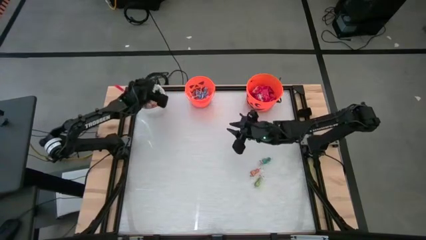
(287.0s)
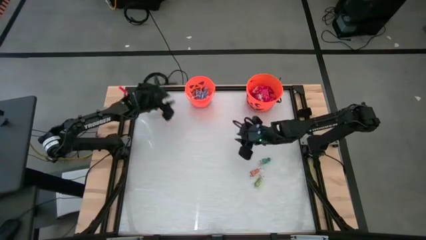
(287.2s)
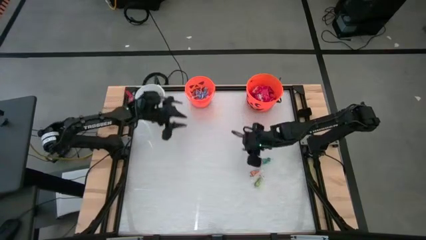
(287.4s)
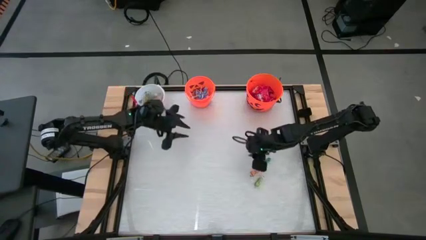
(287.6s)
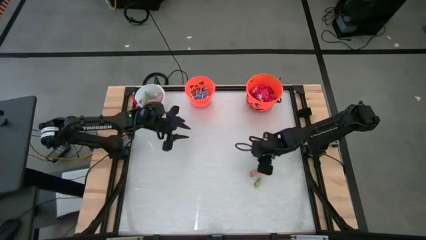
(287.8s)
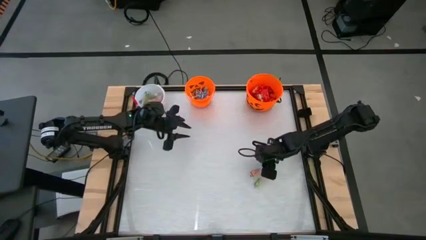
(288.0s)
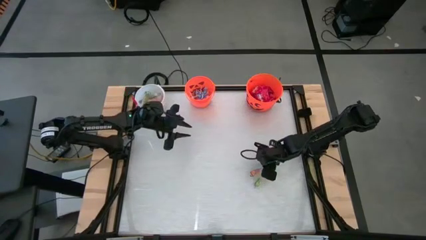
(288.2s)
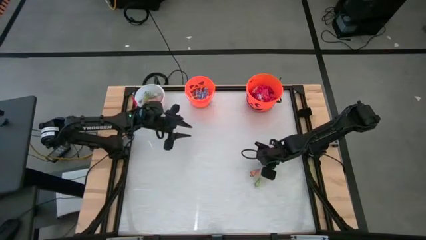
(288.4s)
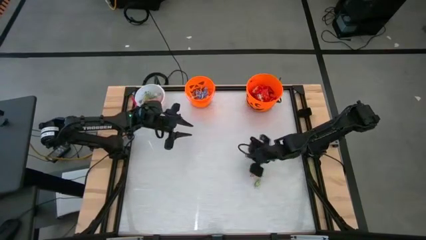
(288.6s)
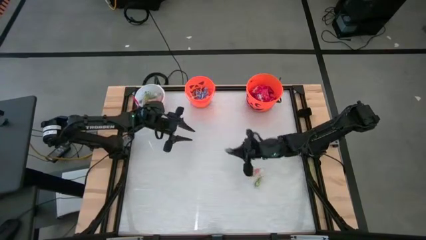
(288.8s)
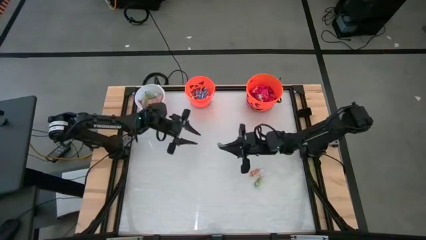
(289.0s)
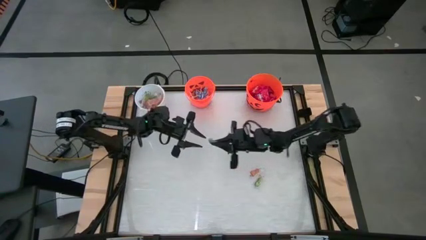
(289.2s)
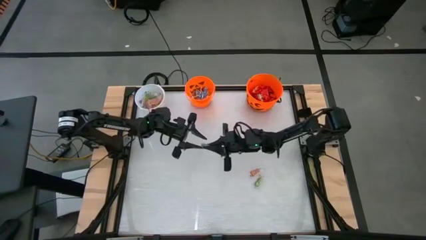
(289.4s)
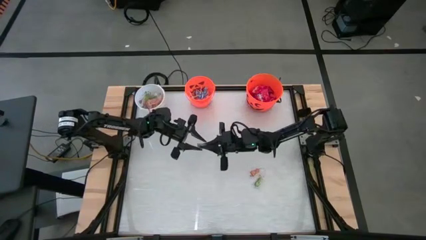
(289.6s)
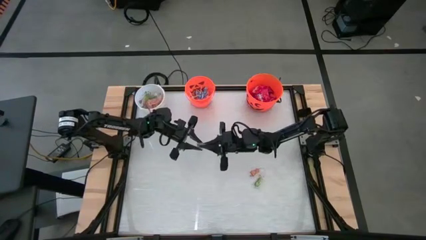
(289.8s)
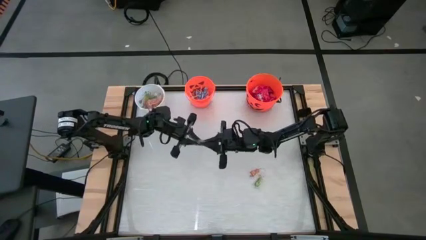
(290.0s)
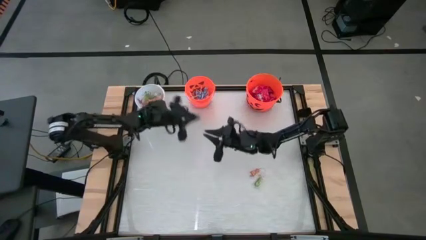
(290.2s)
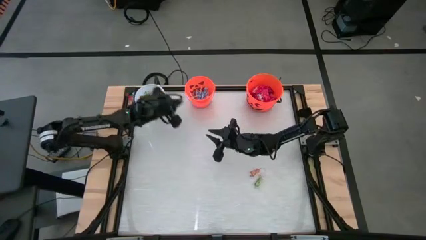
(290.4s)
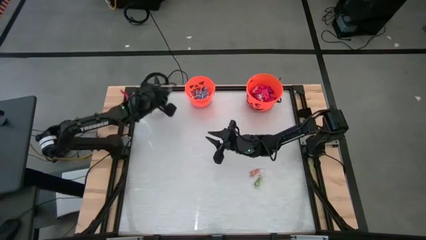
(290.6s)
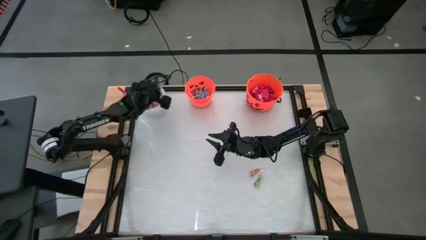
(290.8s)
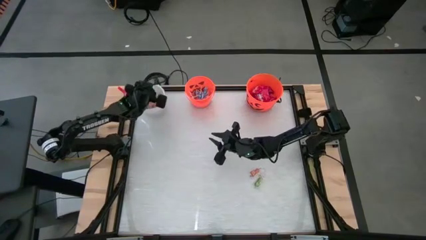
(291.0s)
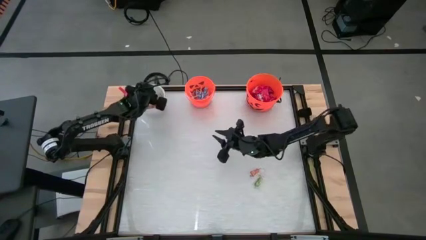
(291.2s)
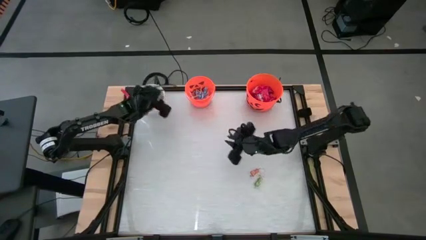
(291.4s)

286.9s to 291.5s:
Task: Sort candy by brand, put in halloween buckets
Put the blue gummy into the white bucket

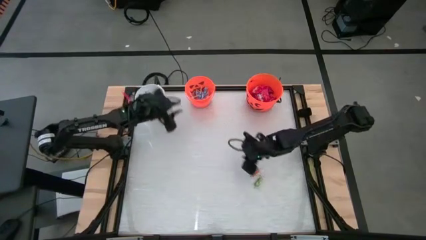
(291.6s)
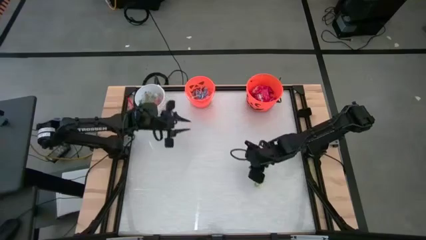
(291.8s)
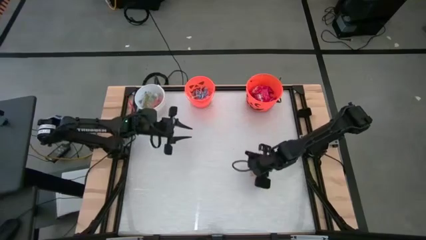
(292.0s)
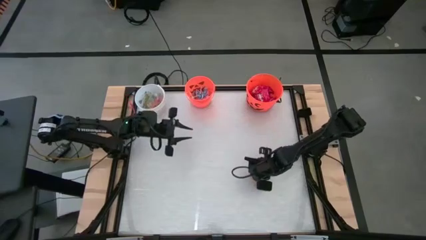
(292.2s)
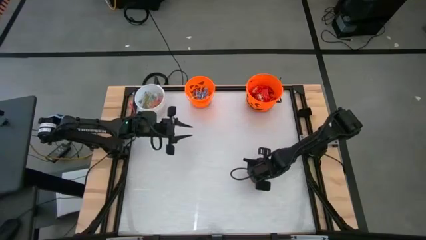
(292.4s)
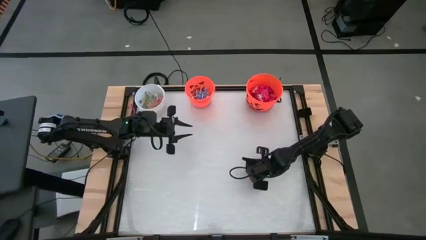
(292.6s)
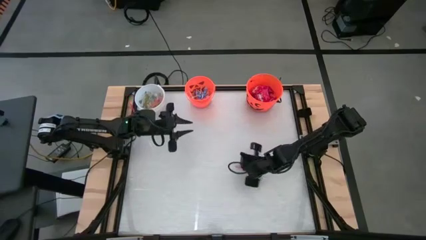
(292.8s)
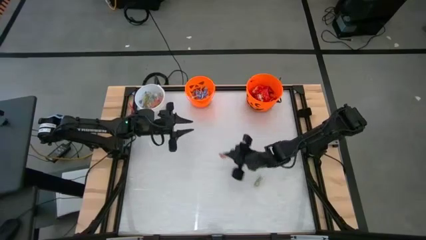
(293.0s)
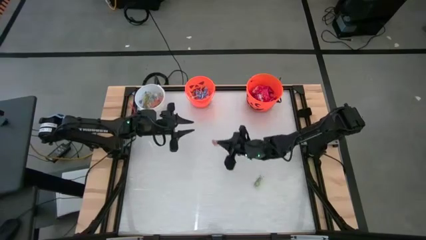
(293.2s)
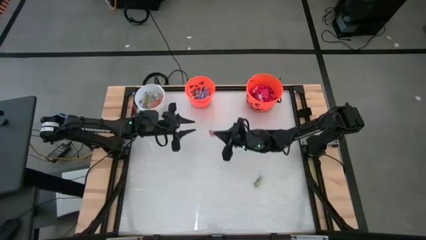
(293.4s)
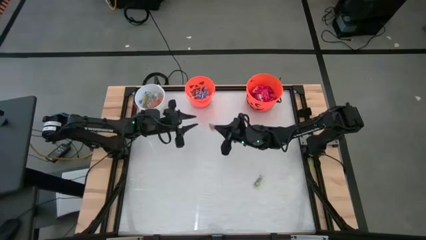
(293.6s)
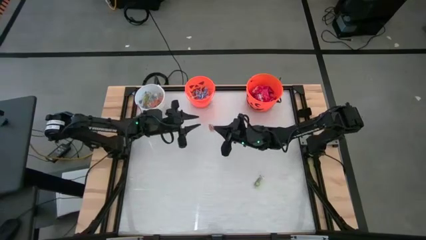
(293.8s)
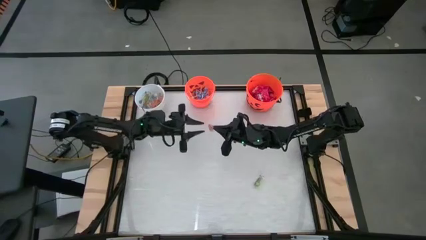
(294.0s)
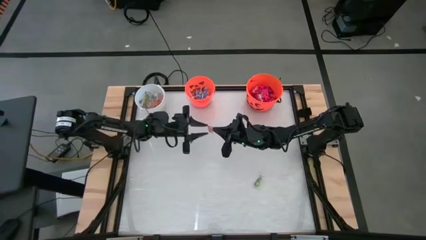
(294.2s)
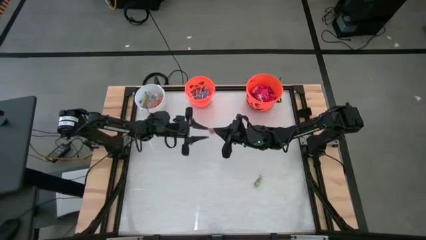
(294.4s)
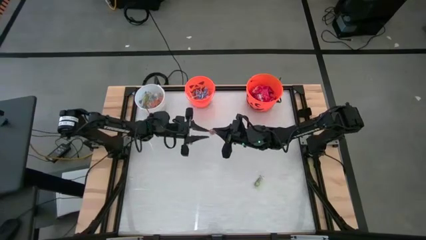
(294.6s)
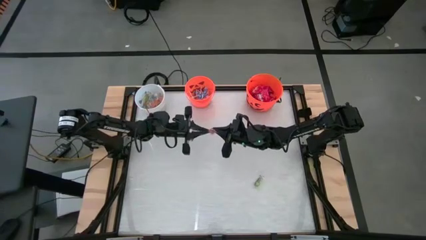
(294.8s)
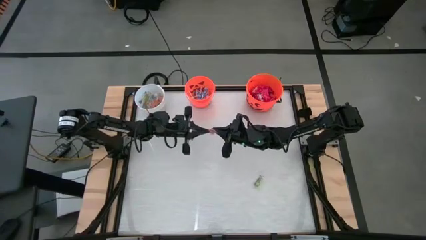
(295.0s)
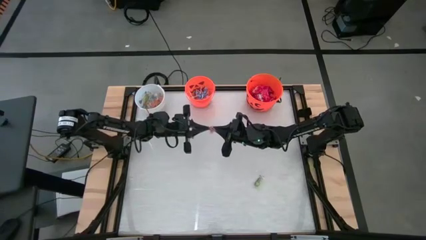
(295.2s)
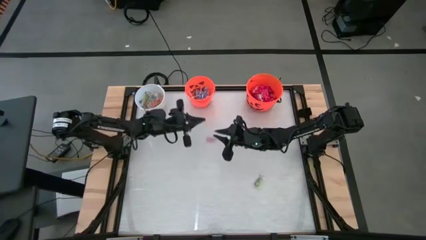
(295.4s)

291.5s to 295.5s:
Put the orange gummy into the white bucket

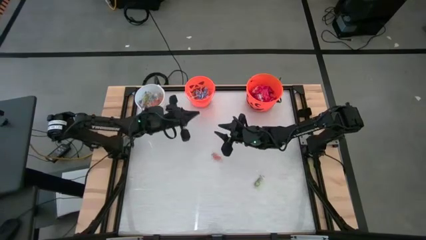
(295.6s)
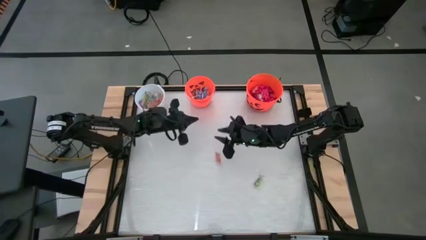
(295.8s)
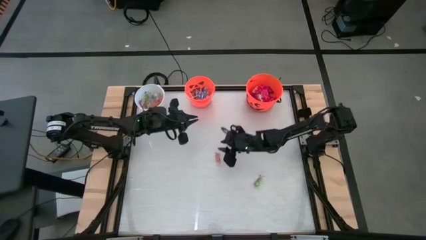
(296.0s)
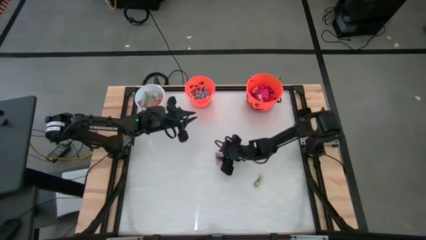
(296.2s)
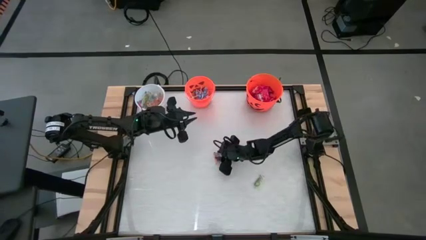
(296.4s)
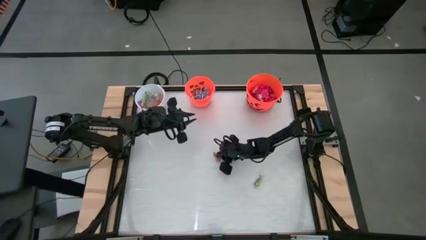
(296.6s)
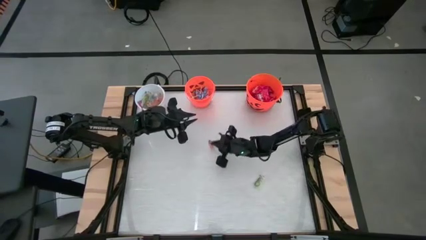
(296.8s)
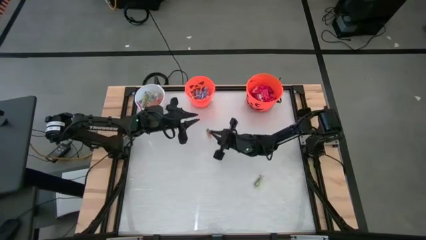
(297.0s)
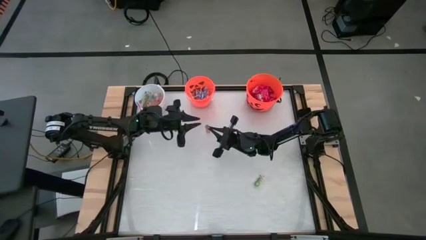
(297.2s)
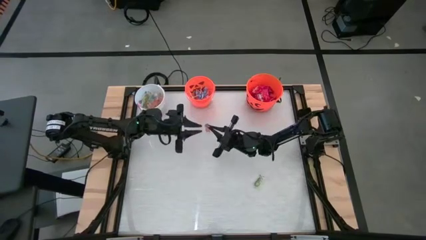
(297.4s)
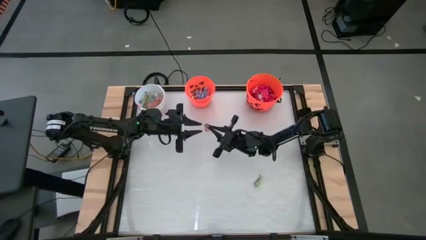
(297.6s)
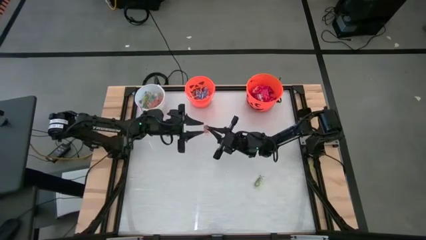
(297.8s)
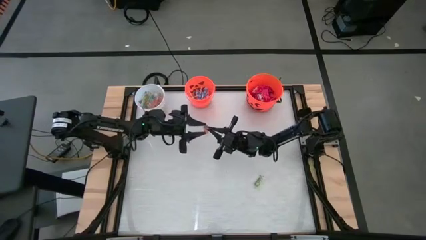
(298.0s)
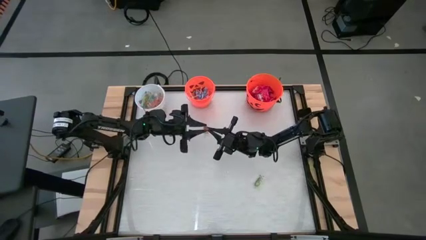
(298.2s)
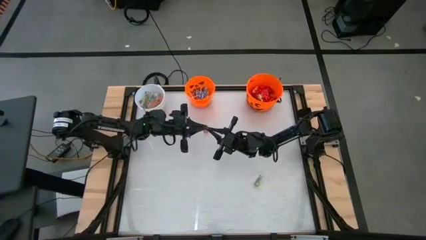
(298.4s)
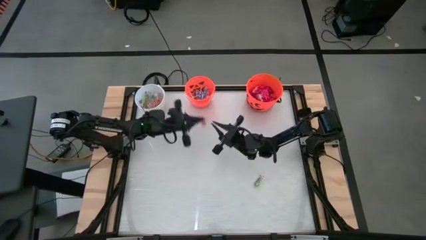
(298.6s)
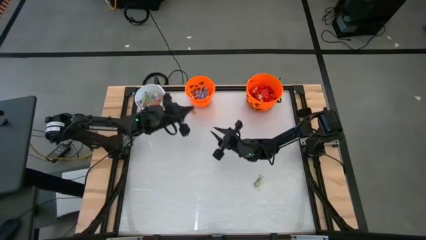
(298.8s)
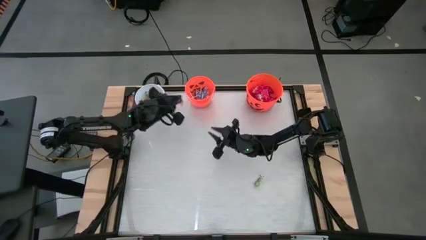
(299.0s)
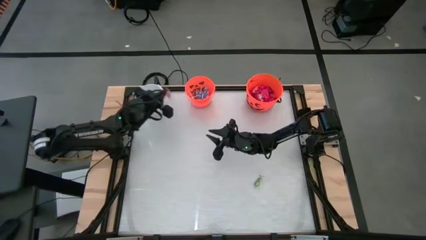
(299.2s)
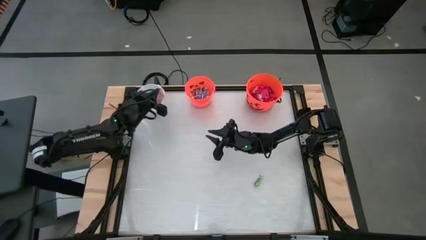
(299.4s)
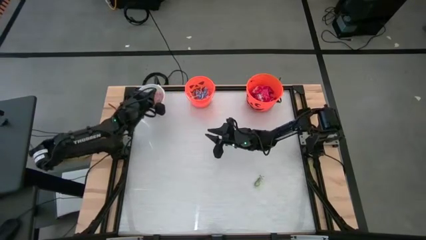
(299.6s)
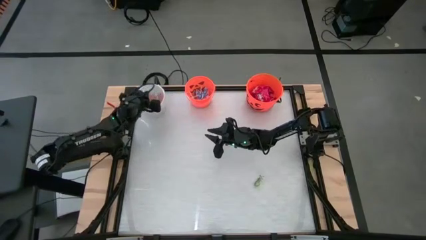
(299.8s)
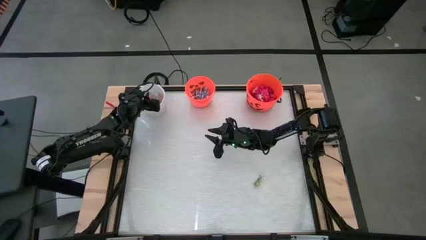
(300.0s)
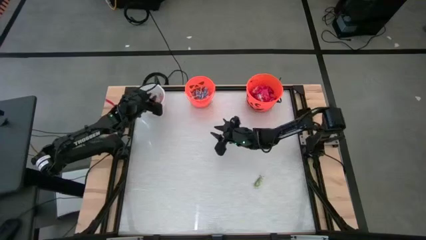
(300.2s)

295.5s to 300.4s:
Put the orange gummy into the white bucket

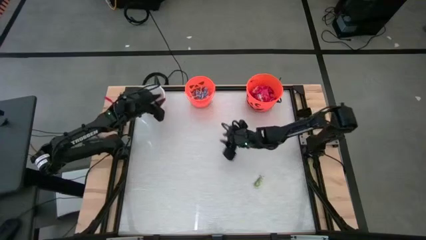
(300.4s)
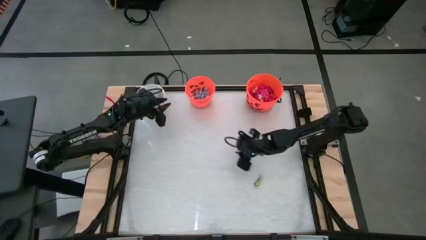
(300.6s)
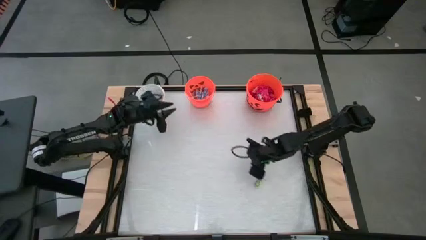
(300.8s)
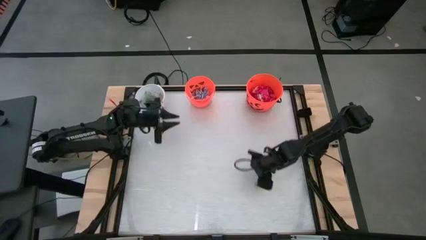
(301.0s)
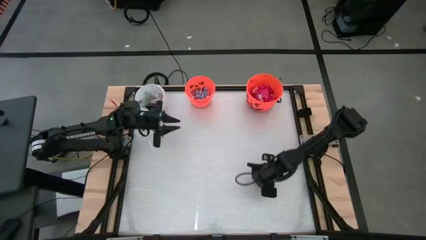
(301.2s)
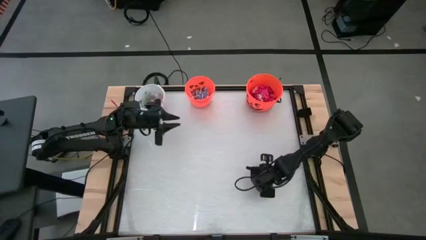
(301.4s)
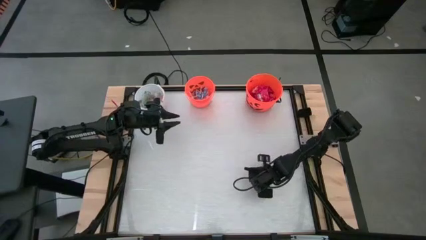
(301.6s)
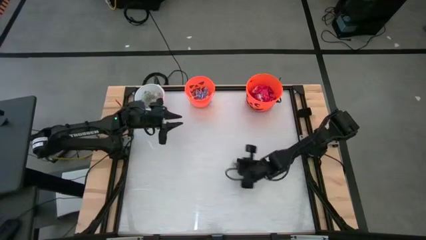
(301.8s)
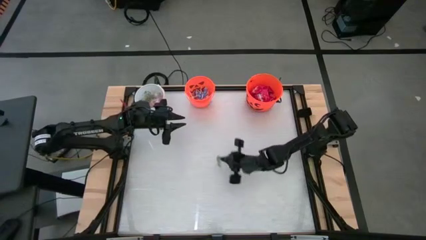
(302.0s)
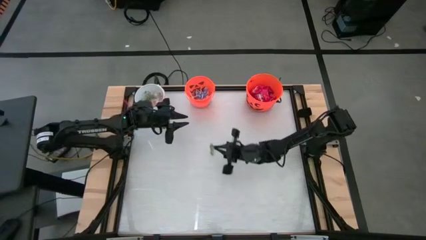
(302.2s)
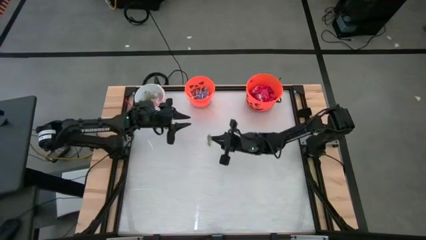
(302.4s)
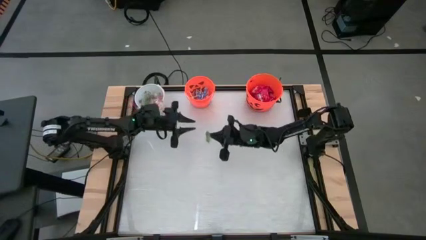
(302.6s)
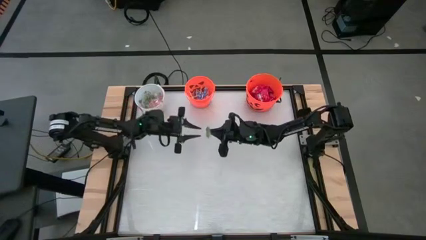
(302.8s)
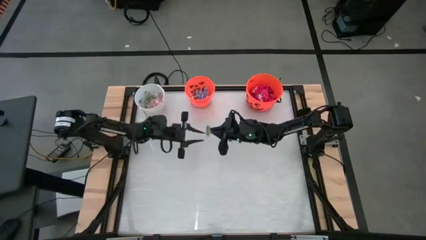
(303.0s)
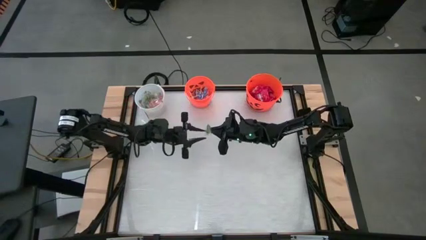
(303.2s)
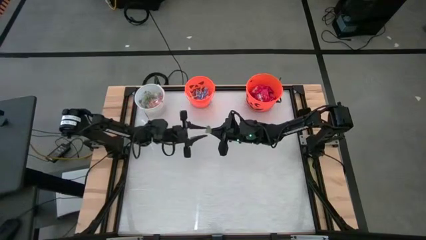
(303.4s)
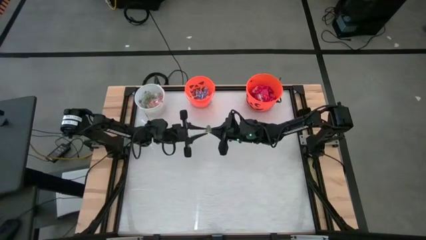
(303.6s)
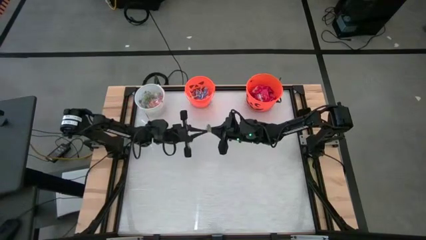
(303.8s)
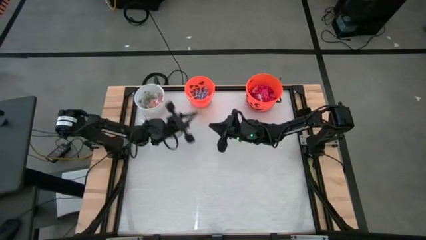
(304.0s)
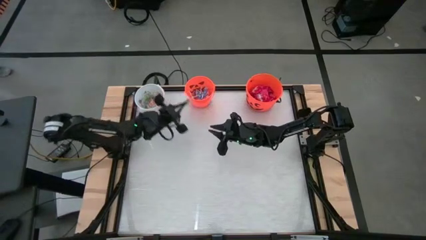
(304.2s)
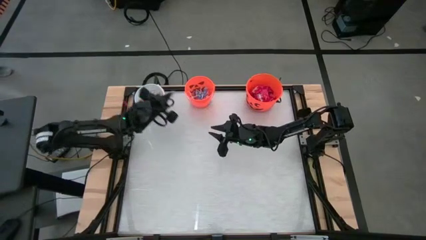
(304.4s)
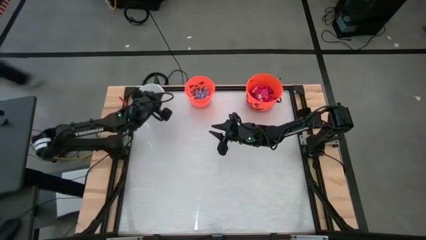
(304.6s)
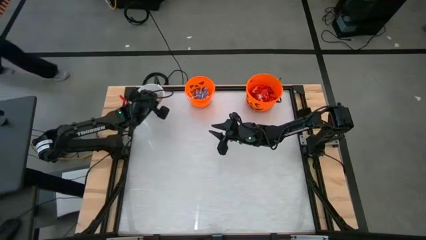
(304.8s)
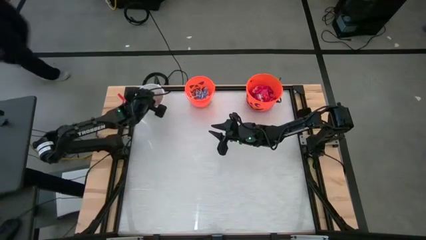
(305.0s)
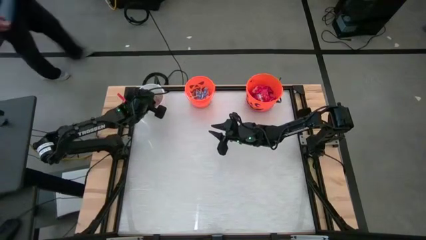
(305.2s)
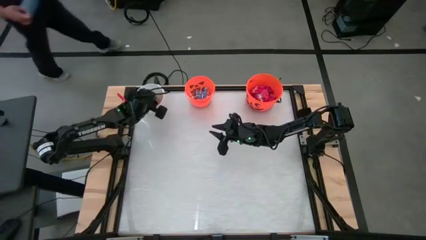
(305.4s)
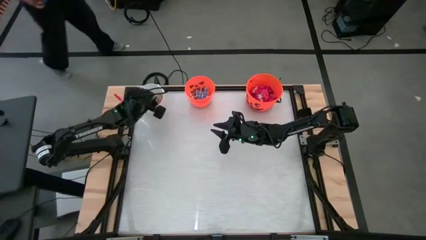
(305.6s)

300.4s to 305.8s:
Put the green gummy into the white bucket
